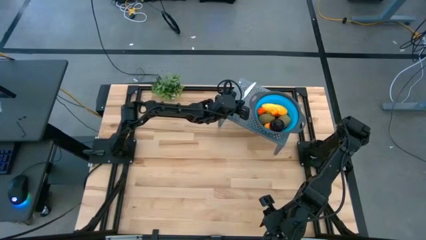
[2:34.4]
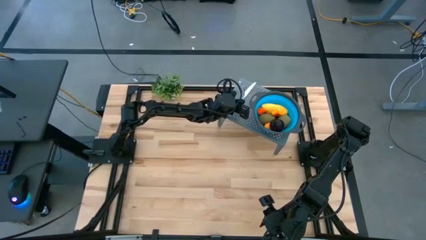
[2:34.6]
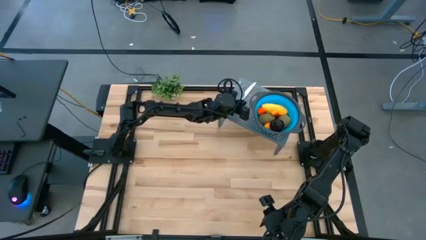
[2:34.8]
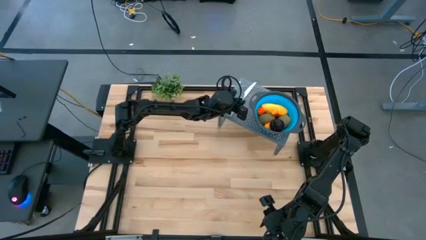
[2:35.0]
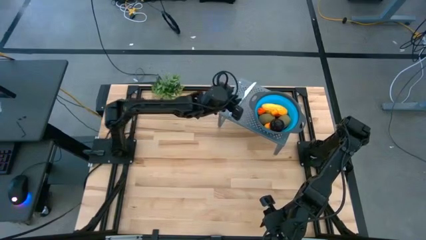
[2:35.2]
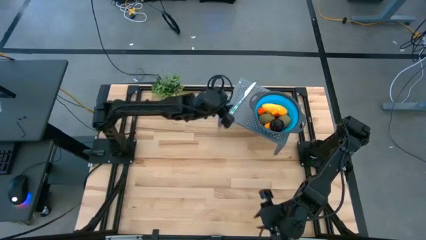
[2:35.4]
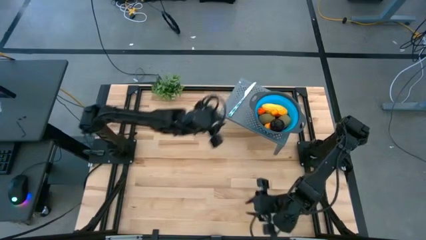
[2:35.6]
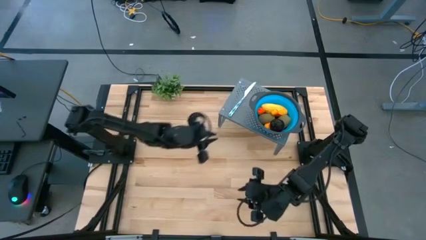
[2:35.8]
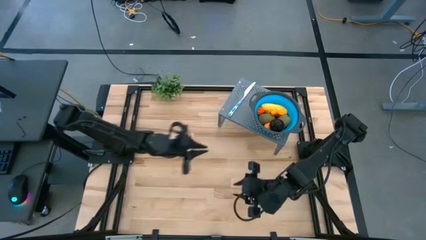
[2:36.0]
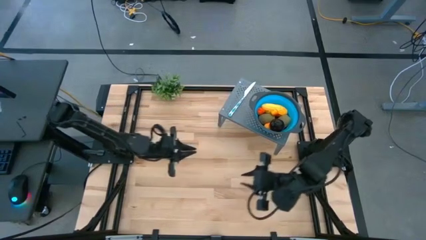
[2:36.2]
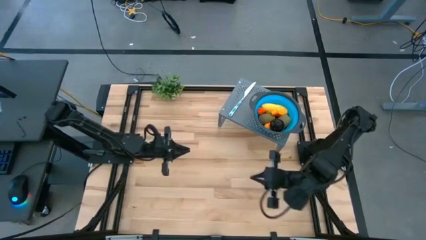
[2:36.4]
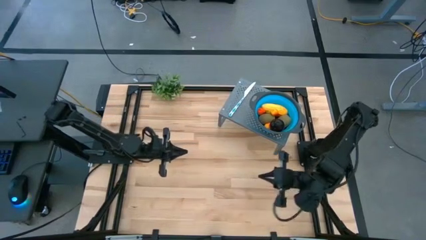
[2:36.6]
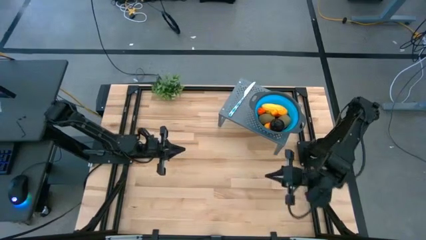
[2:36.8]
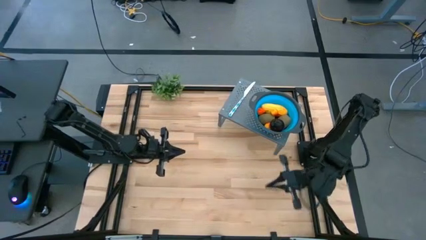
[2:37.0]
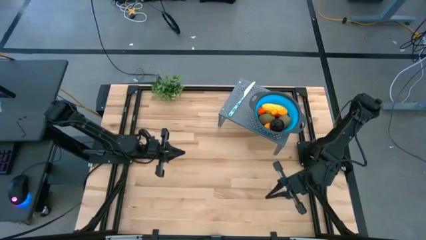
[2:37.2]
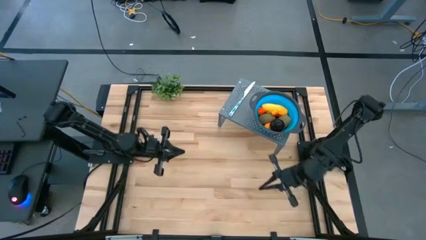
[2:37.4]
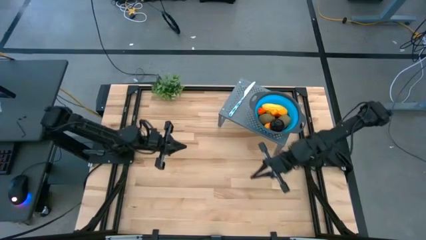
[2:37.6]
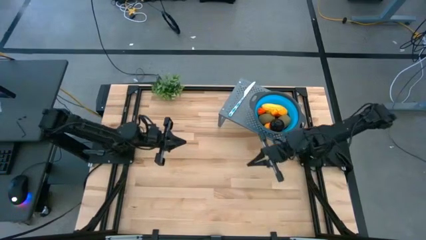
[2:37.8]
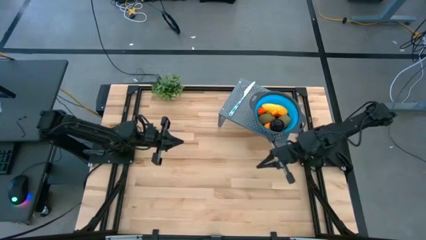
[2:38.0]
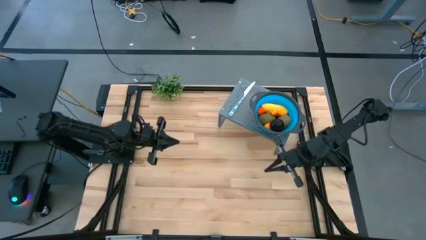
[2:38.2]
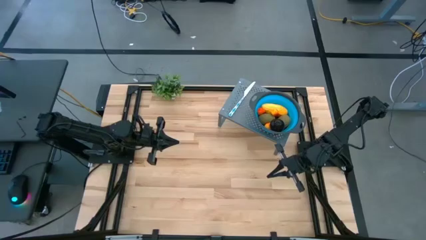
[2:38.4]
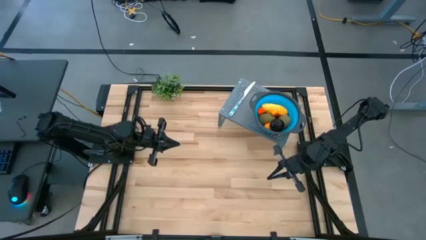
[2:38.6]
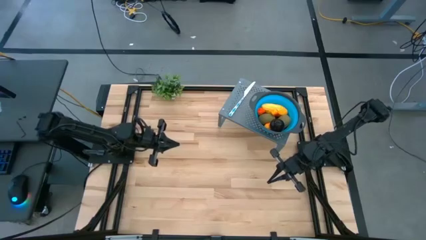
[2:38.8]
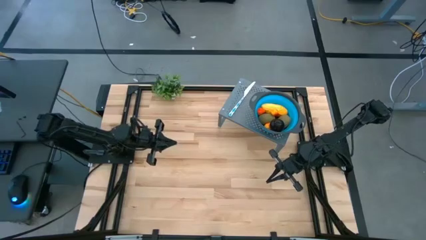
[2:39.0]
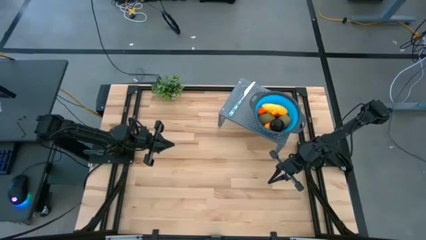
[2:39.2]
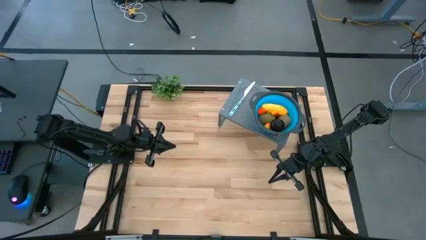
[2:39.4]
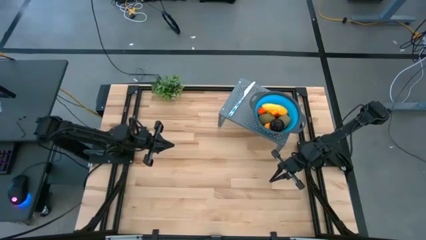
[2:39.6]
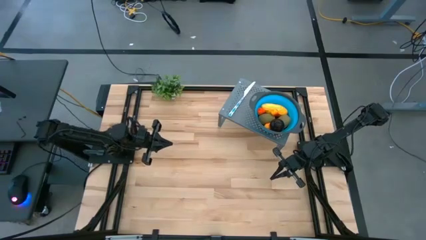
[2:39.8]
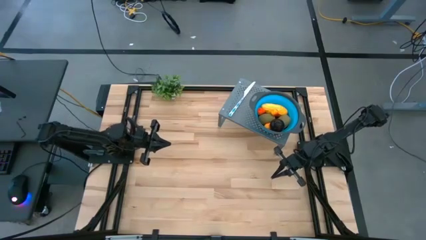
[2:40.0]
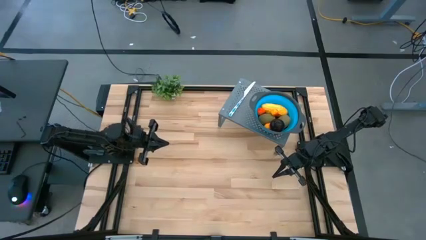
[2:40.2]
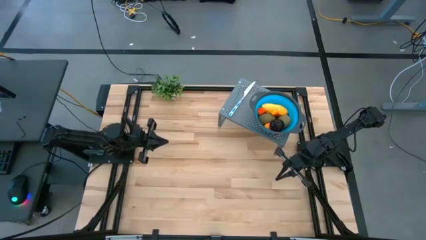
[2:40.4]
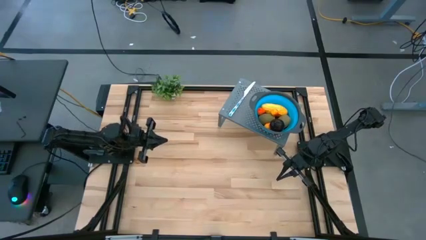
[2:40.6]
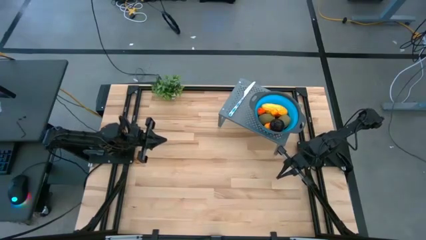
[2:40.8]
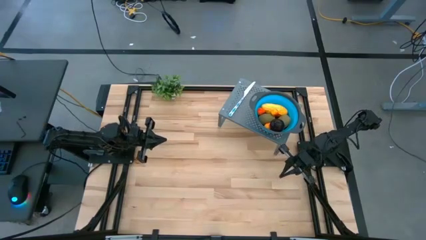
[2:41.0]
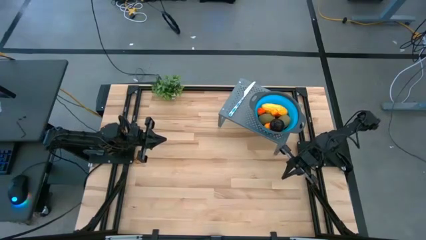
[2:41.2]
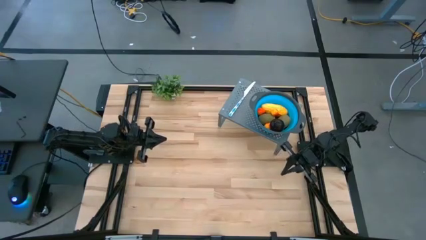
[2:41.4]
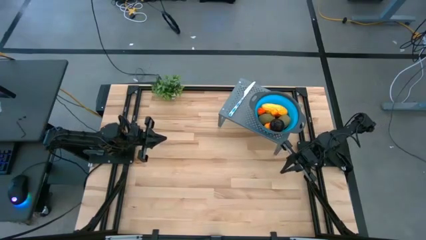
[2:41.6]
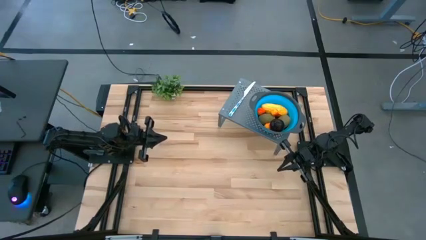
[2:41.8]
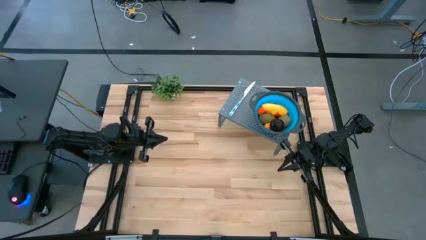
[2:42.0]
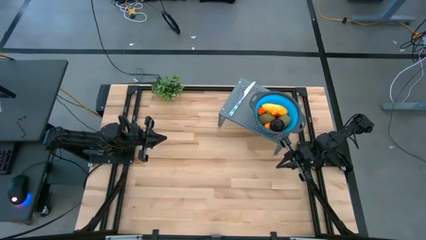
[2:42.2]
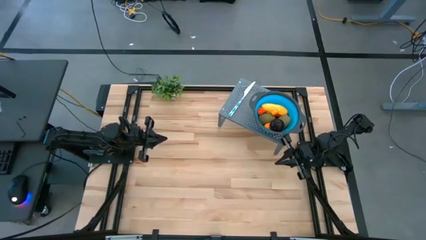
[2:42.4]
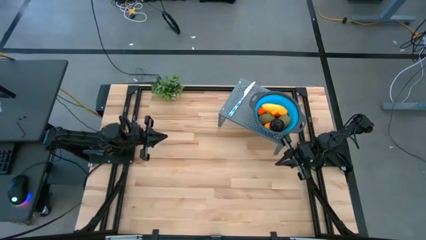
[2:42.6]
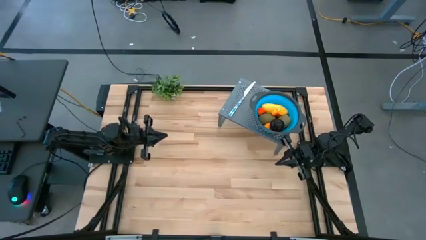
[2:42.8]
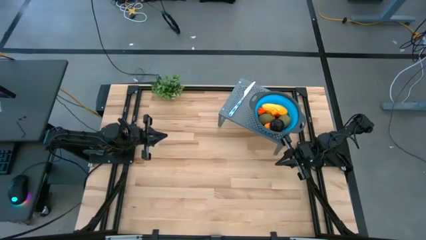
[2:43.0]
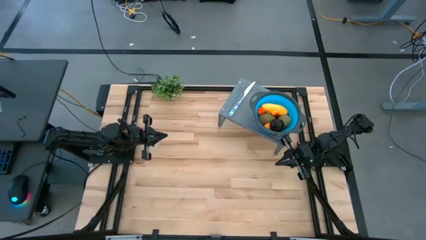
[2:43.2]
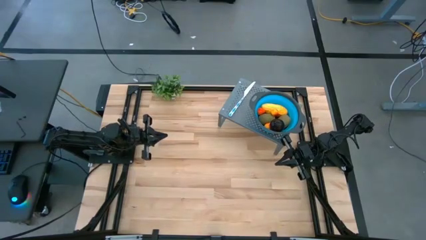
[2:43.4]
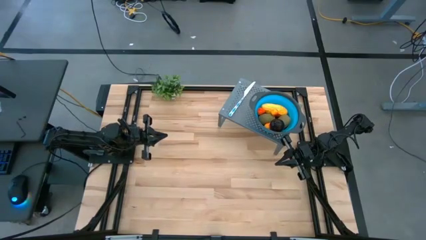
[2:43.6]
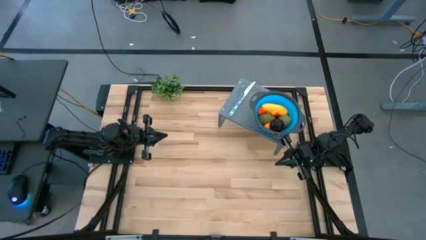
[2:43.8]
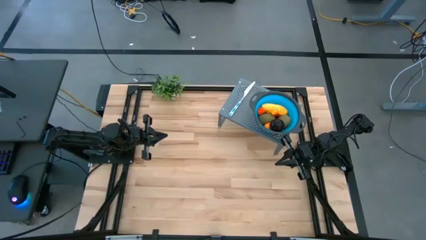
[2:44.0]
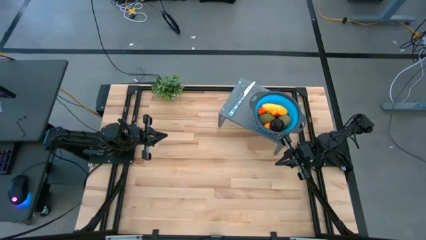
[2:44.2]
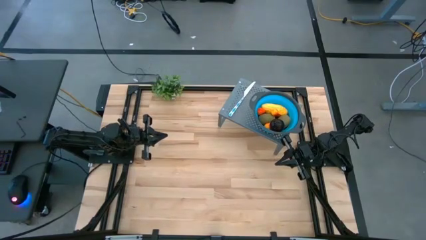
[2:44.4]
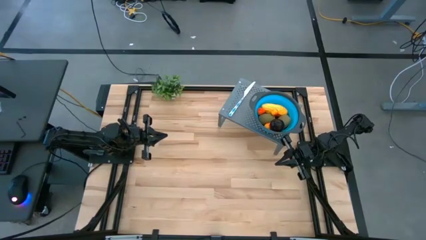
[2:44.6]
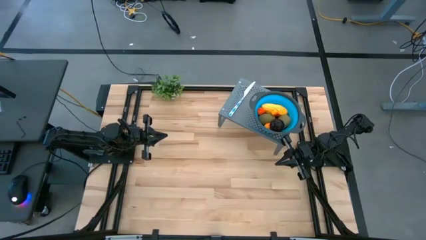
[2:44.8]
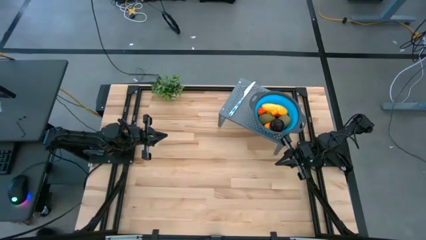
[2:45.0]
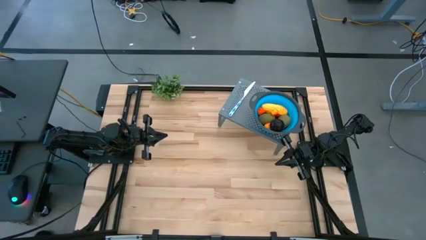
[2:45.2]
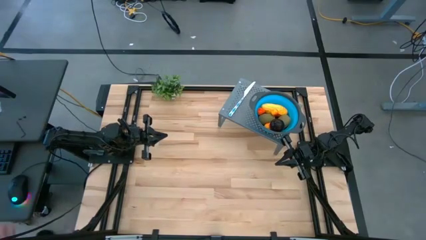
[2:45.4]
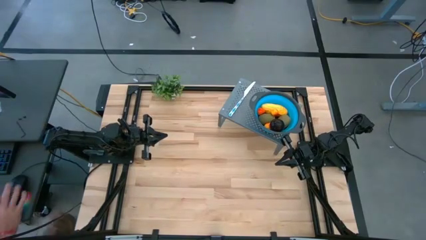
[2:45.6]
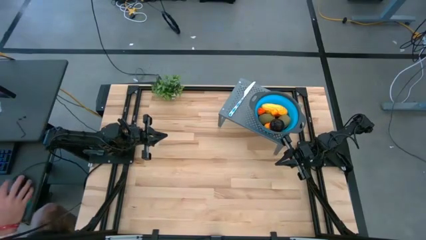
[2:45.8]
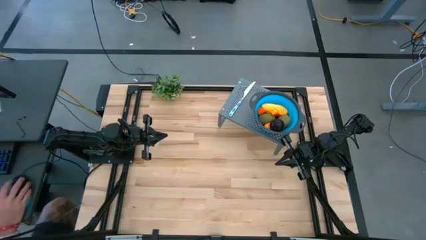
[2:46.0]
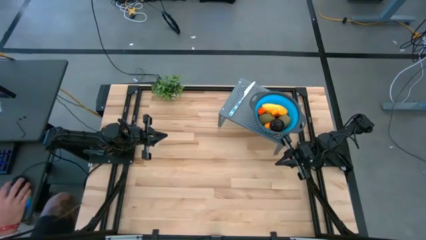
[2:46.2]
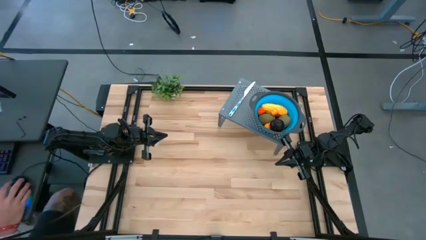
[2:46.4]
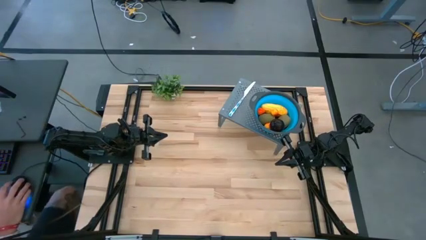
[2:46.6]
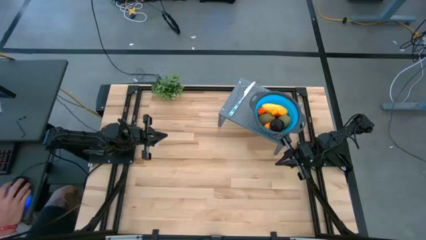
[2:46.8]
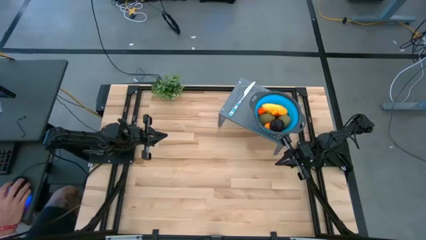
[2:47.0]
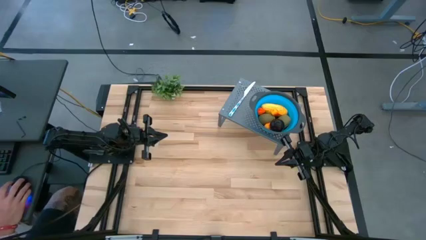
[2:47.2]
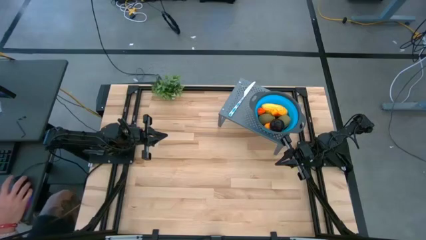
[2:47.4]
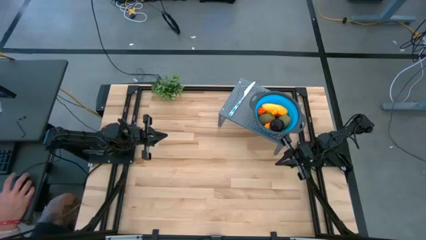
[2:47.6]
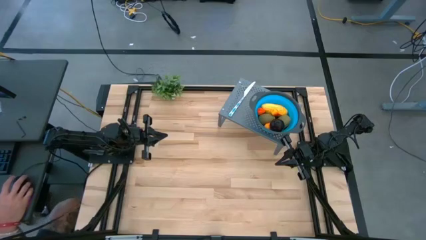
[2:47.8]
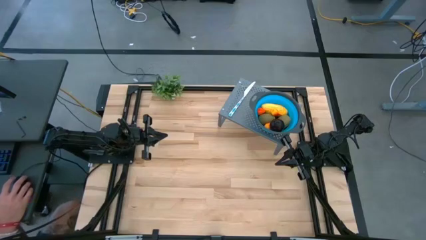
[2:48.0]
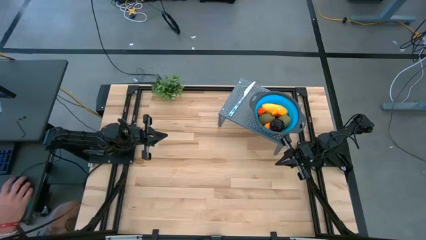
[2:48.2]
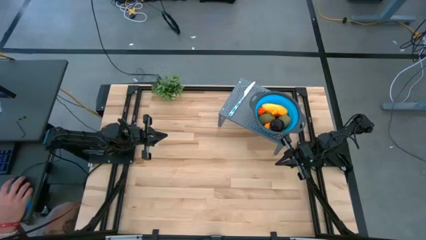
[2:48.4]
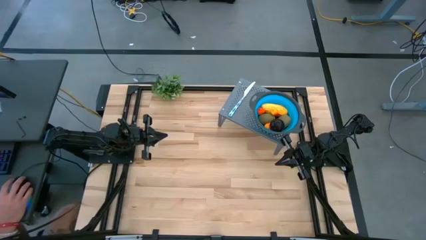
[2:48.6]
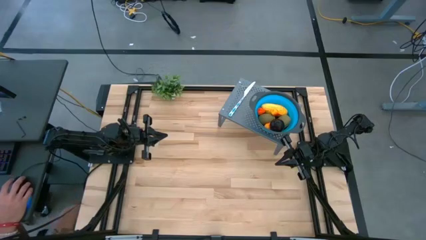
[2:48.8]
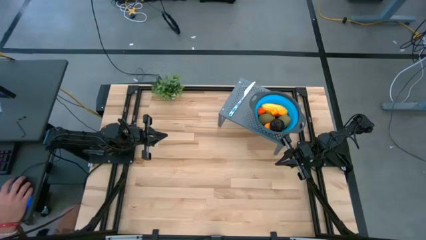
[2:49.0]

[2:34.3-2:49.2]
Task: Pick & Place Fruit
Return to Home Position
